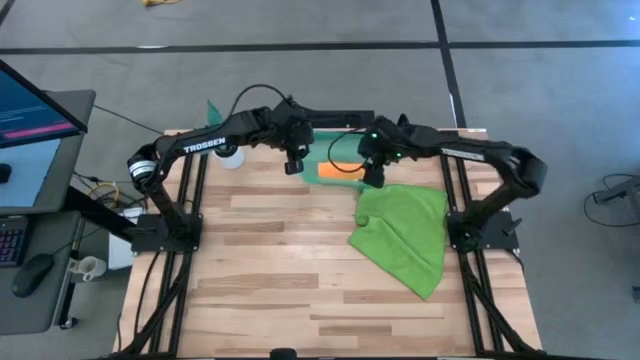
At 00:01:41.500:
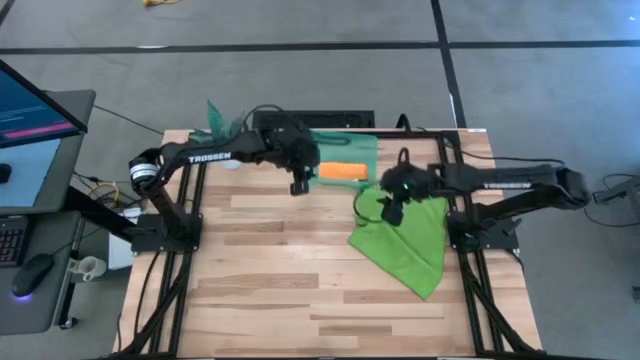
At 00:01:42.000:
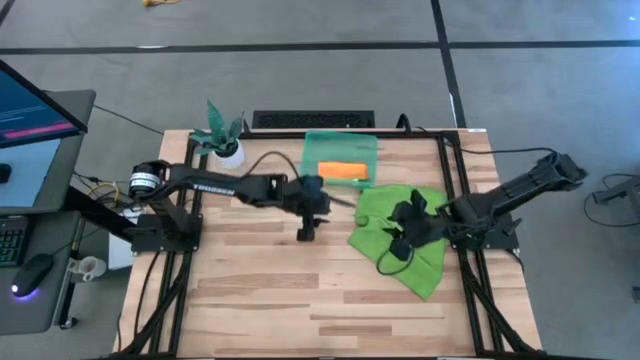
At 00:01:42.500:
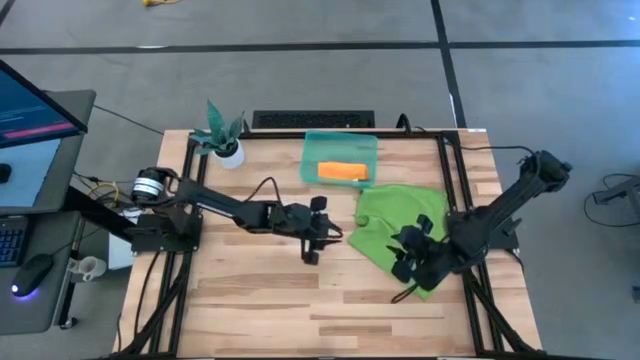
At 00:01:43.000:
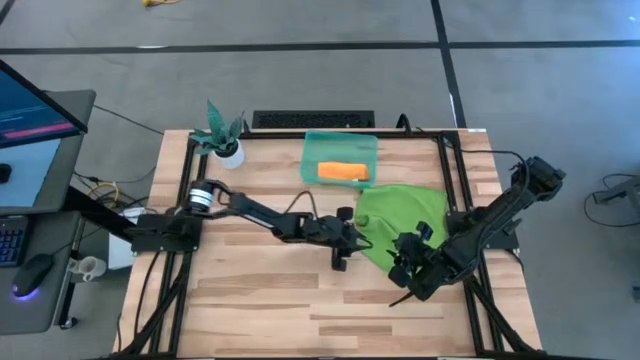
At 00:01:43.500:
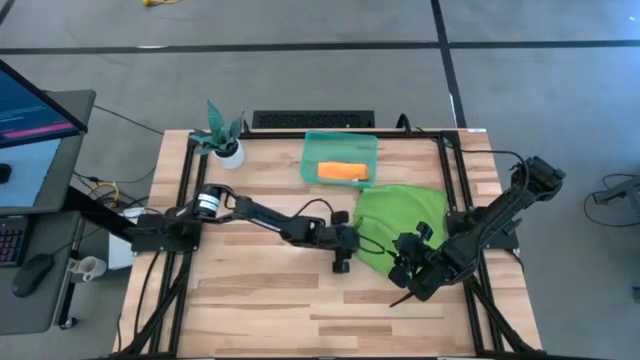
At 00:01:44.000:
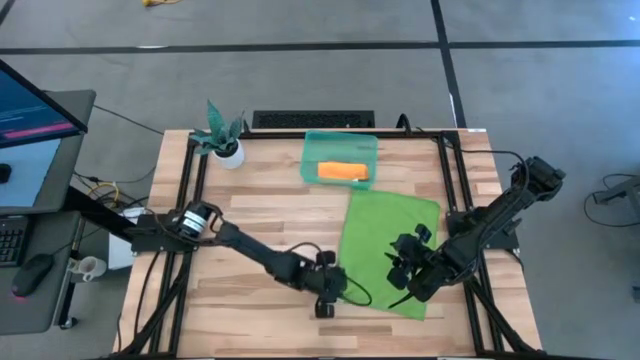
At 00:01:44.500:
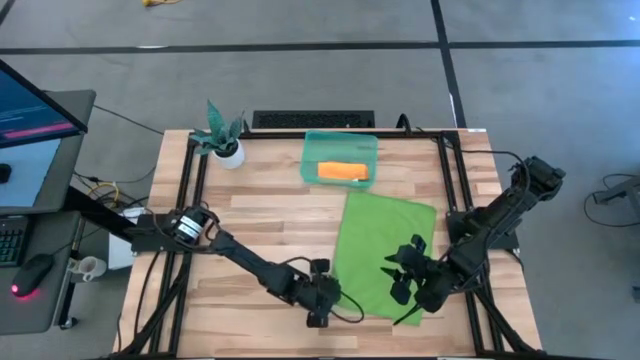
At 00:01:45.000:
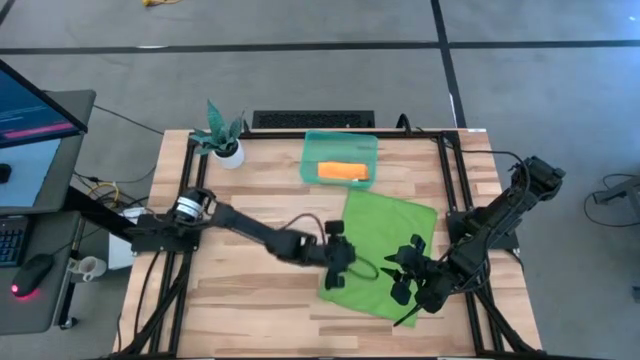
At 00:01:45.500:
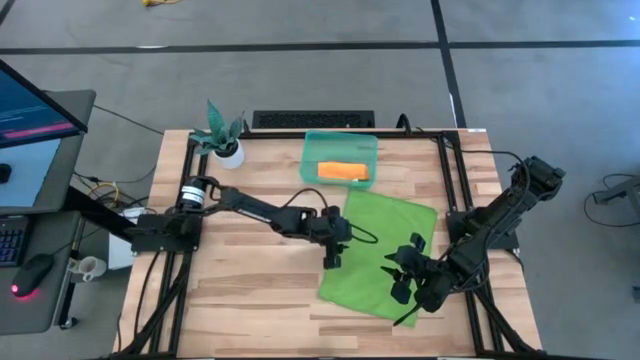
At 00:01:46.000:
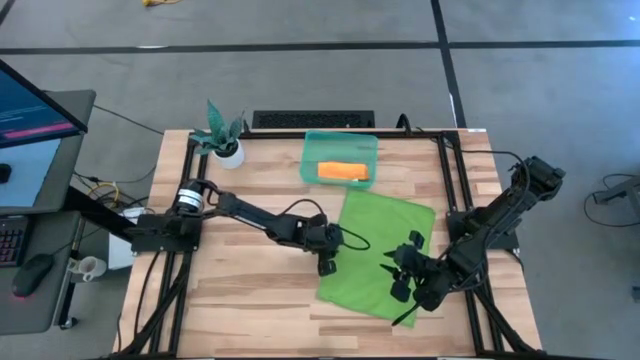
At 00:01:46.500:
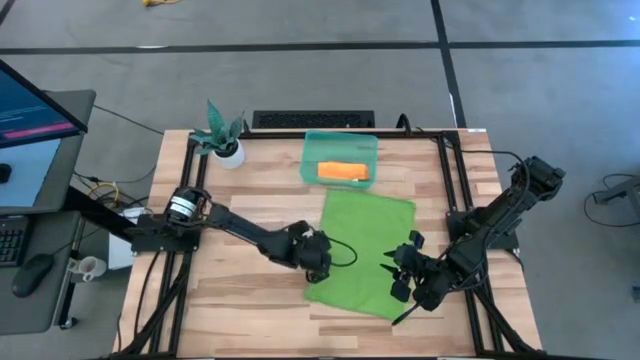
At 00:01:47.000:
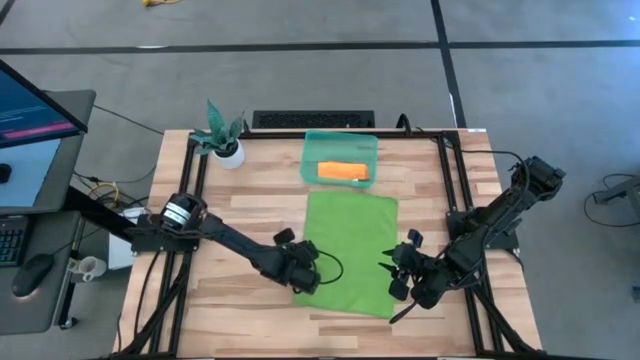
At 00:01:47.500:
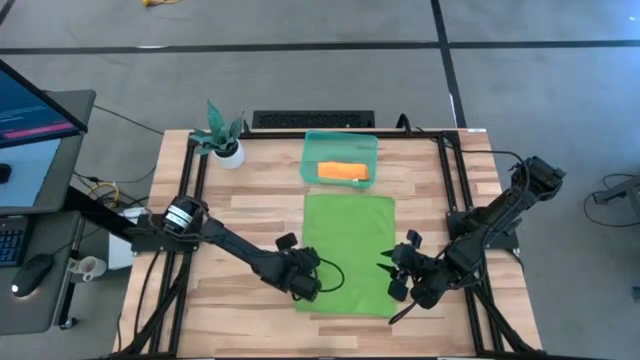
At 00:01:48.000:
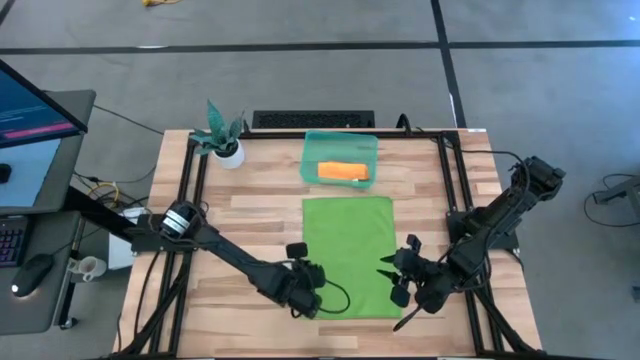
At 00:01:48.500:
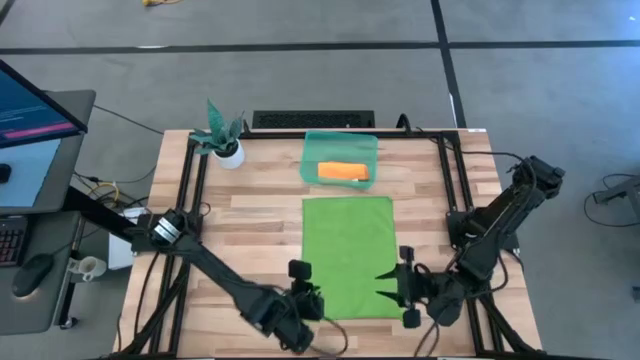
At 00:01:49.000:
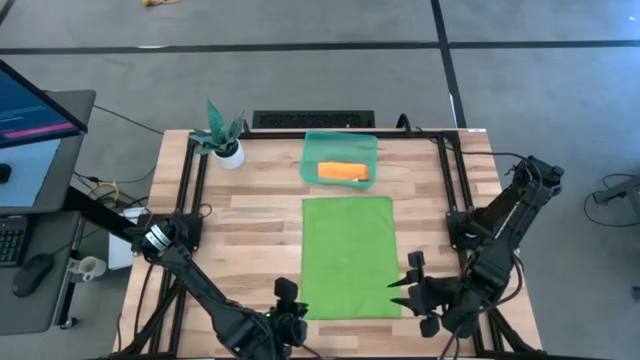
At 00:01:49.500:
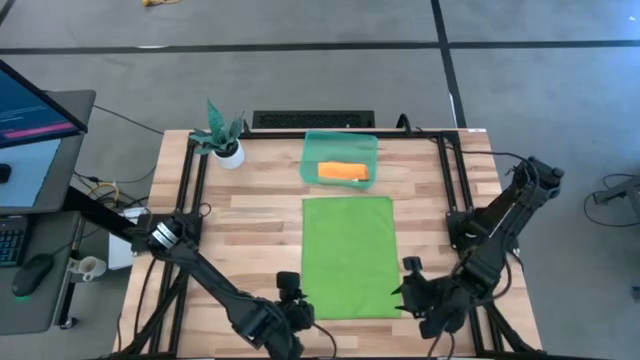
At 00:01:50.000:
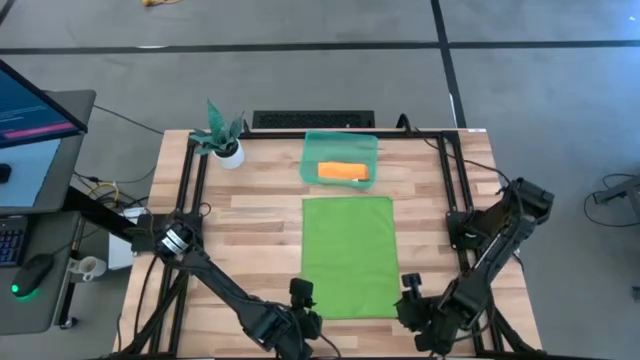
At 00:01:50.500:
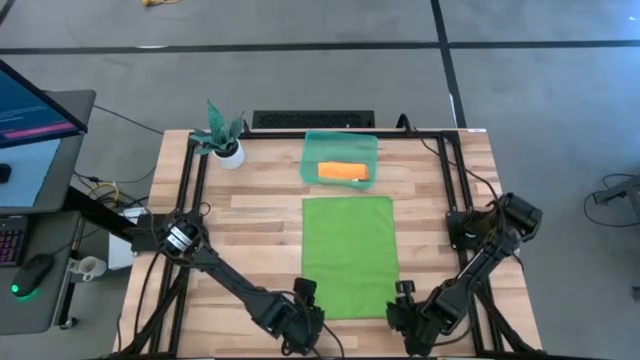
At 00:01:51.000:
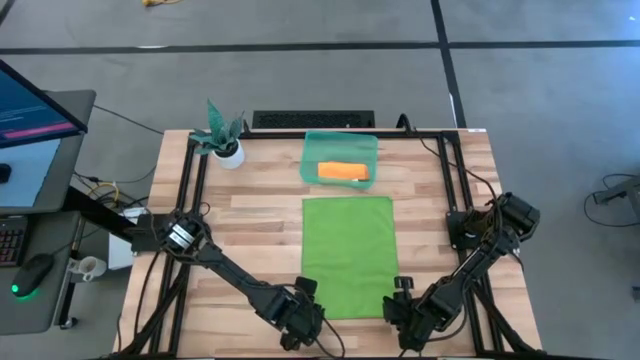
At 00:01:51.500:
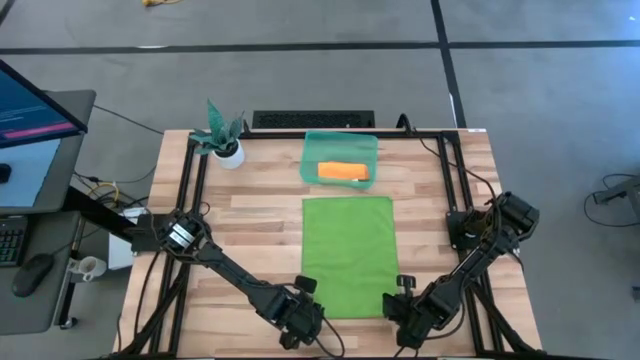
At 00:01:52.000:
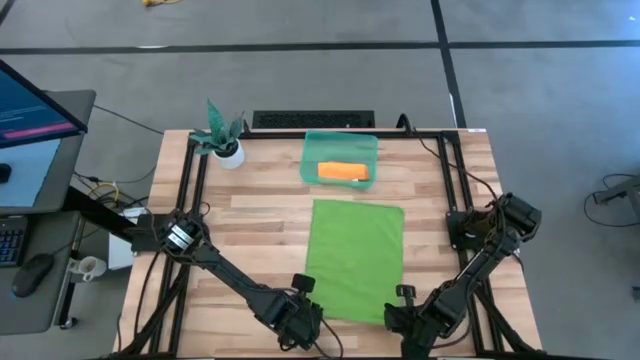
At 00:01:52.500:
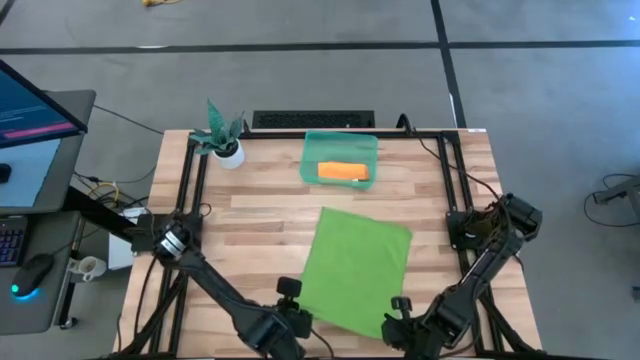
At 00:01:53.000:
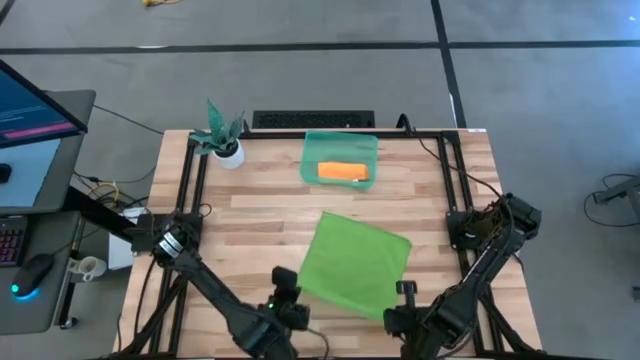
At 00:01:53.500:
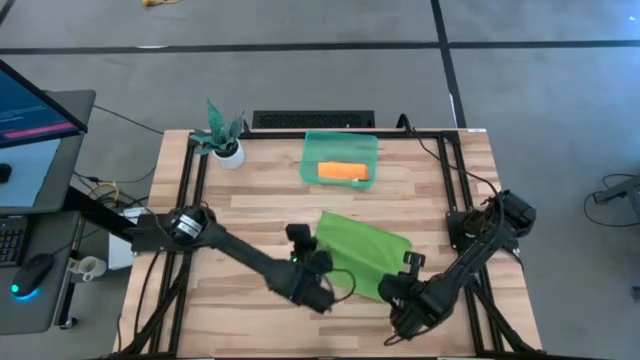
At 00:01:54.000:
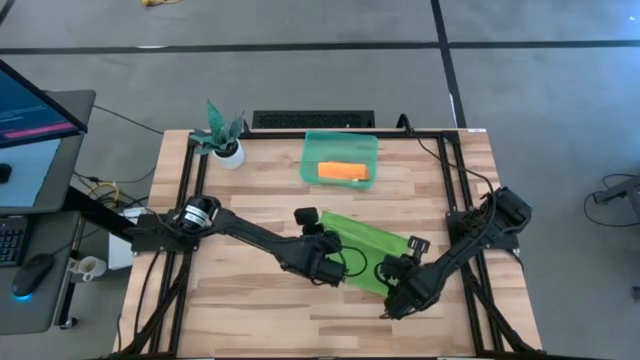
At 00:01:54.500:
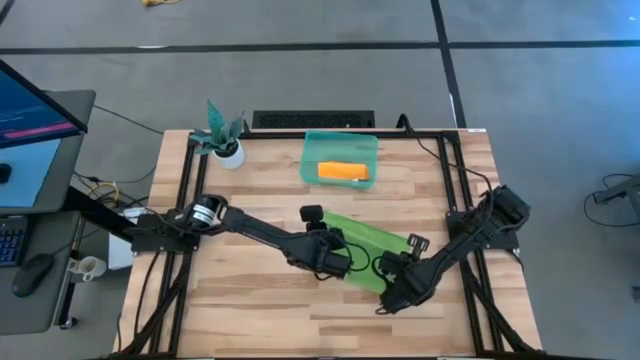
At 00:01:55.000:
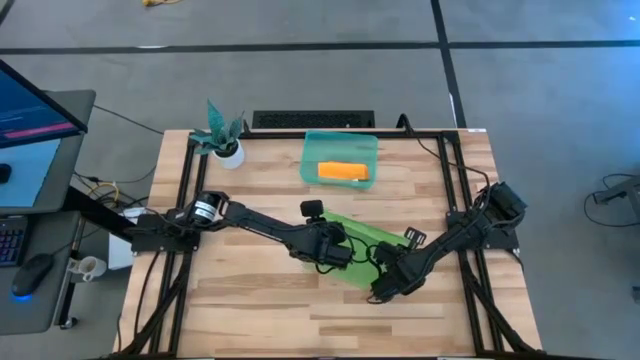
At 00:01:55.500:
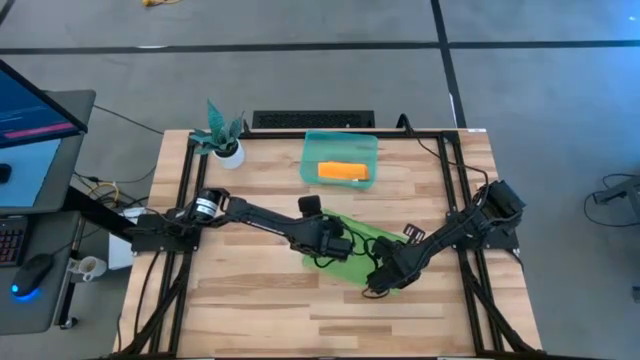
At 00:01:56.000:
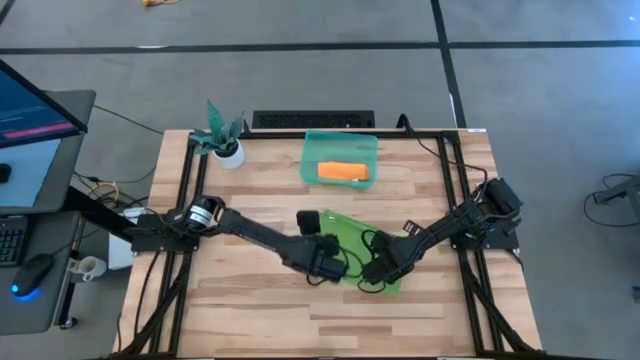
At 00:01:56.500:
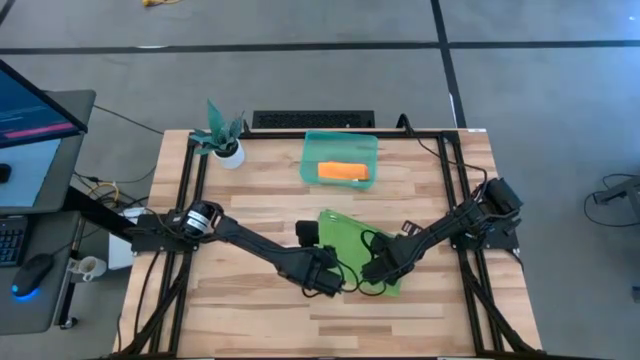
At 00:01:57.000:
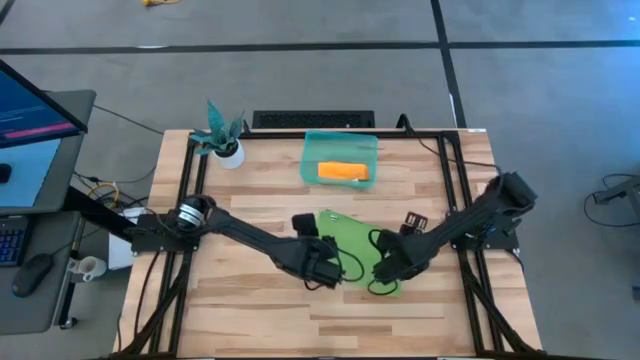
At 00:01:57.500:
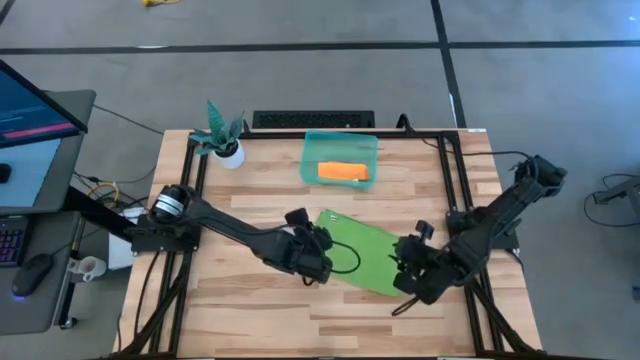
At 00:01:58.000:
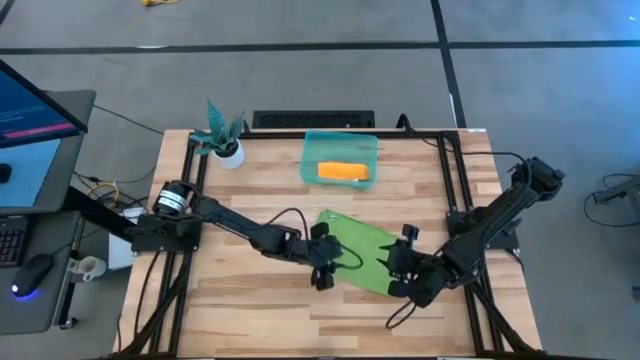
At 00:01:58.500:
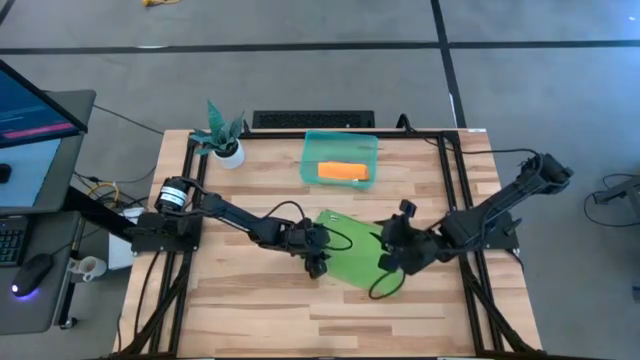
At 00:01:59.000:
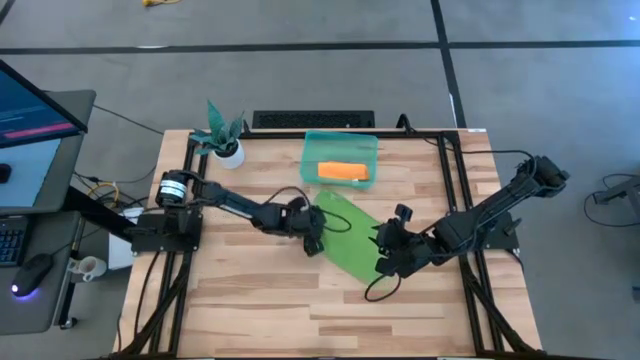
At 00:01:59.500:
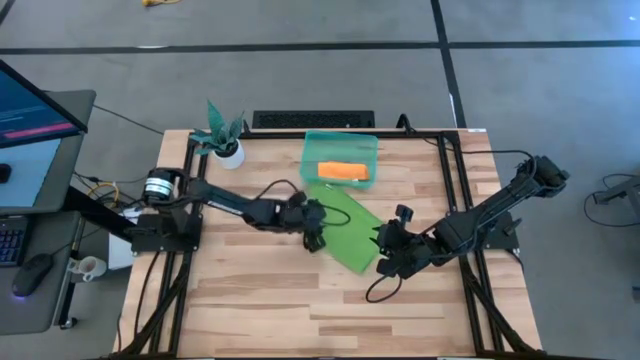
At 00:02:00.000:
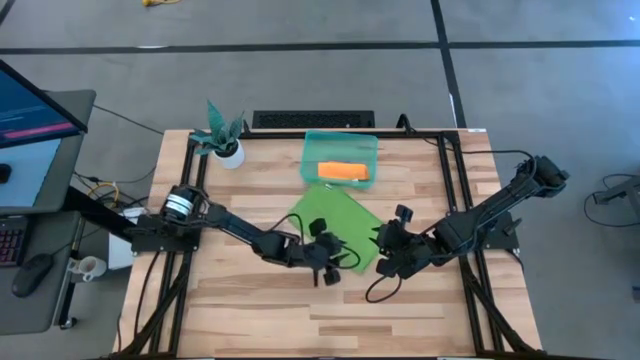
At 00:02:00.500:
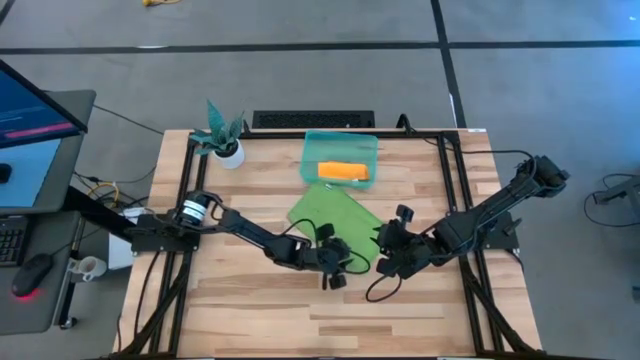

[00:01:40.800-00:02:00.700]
Task: Roll microfiber towels into tight, uniform cylinder then place into a basket
Fold the green towel

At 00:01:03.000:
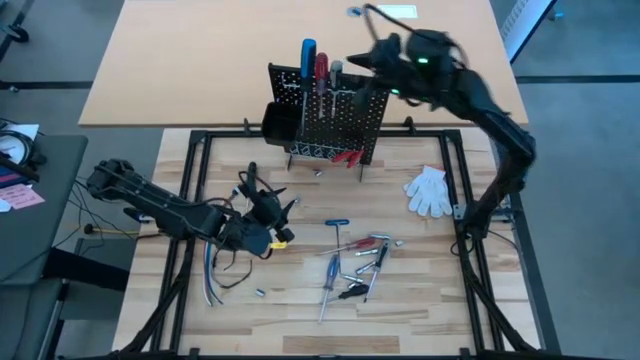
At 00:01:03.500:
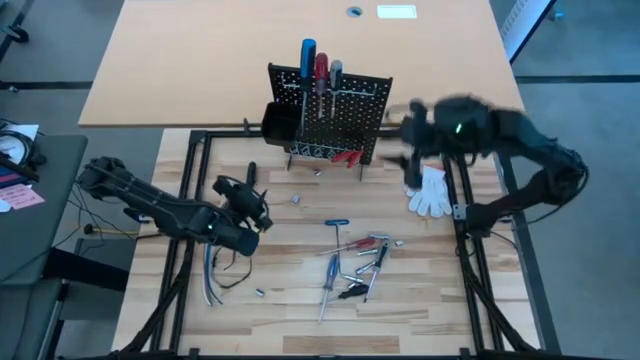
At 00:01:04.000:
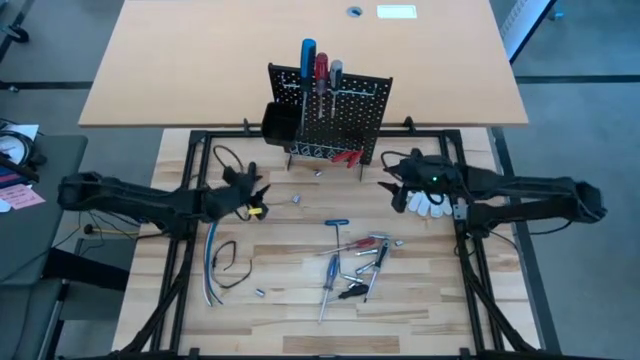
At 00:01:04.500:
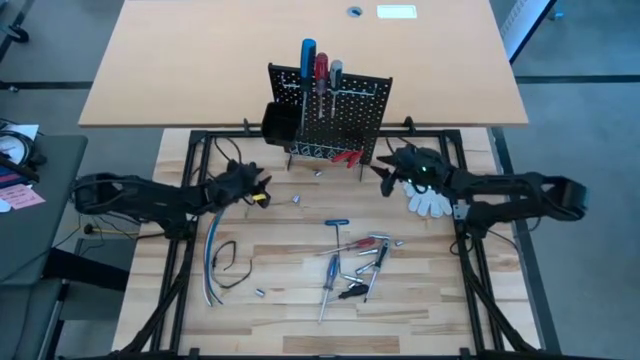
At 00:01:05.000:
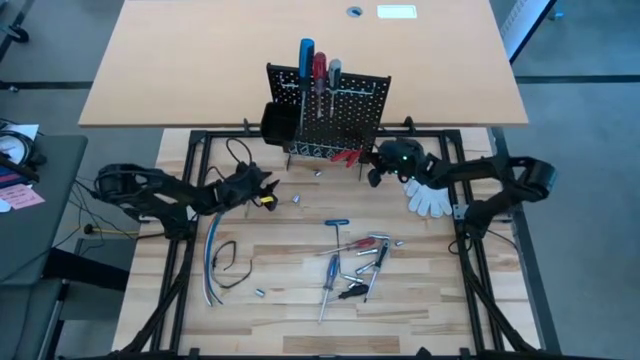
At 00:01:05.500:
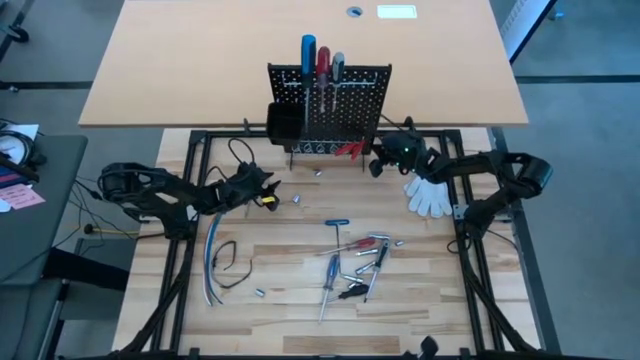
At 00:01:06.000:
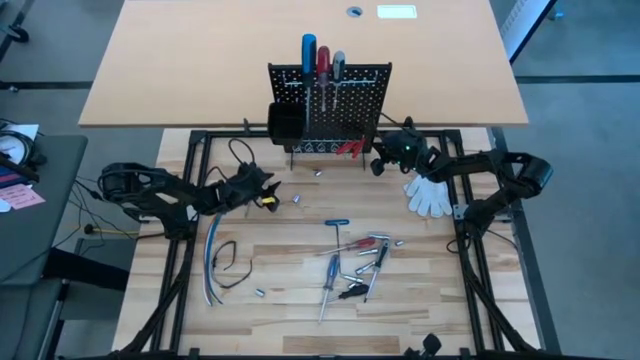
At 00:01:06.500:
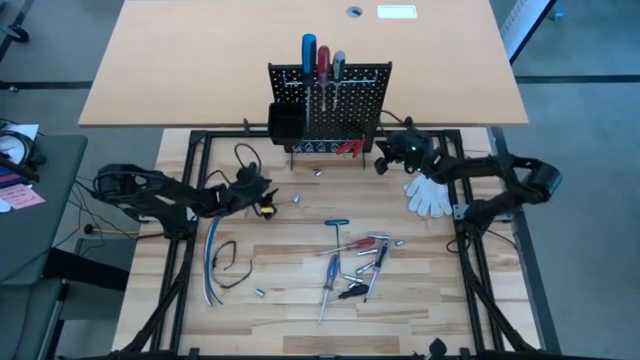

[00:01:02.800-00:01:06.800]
Task: Hang tools onto peg board
Adjust the black pegboard
